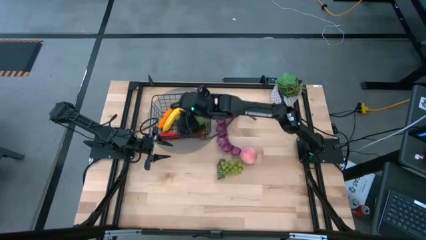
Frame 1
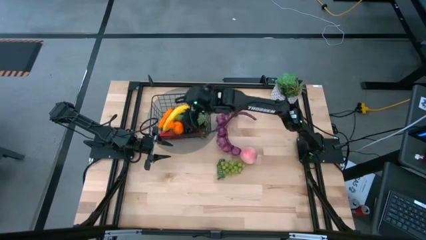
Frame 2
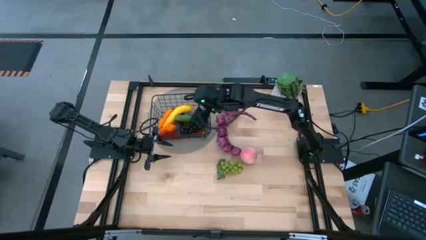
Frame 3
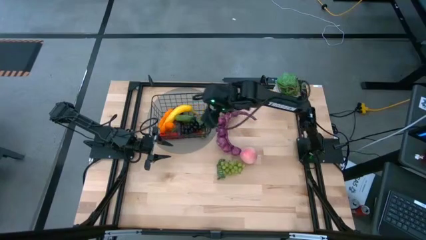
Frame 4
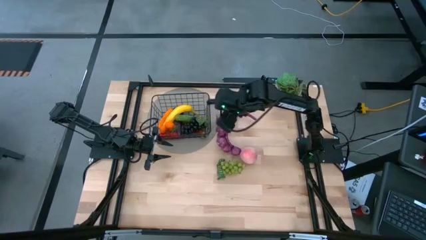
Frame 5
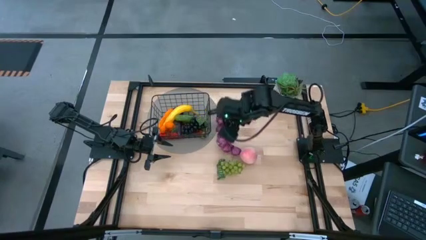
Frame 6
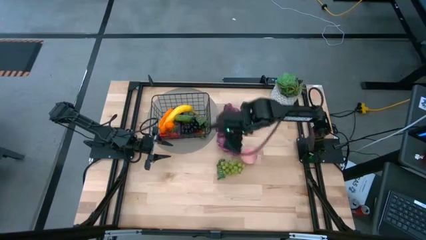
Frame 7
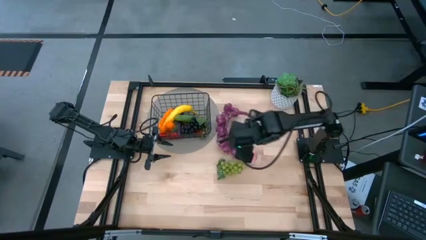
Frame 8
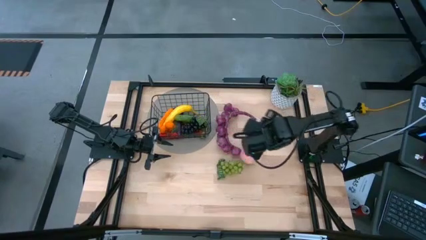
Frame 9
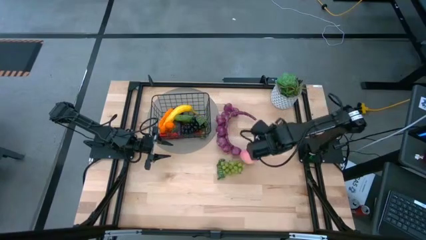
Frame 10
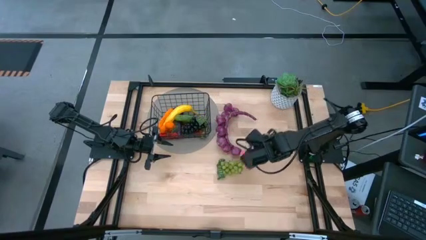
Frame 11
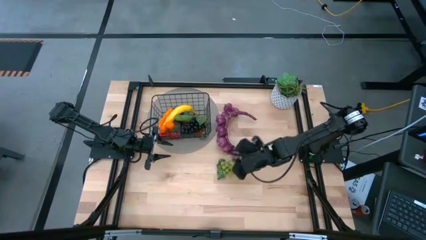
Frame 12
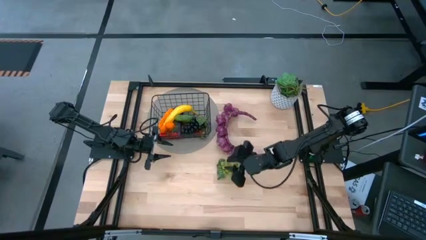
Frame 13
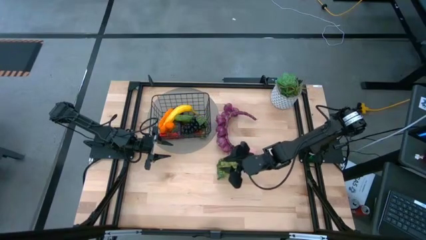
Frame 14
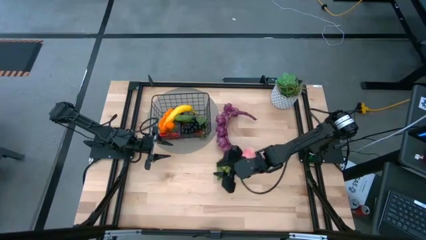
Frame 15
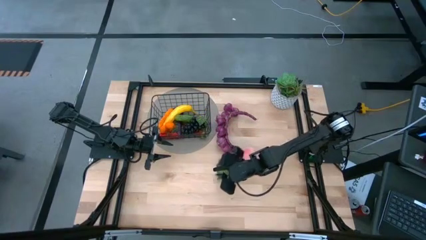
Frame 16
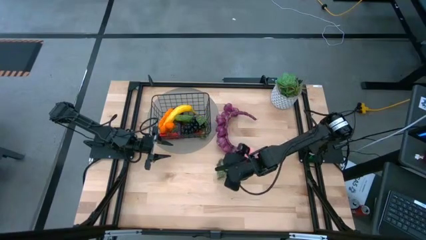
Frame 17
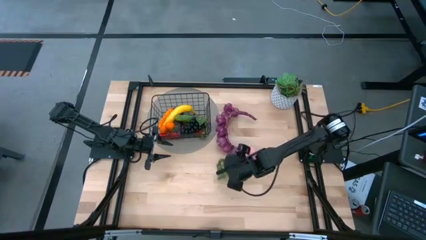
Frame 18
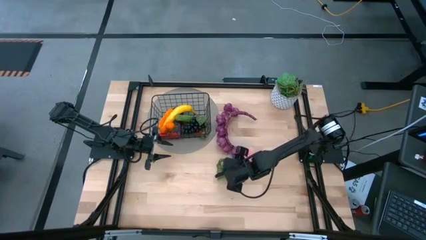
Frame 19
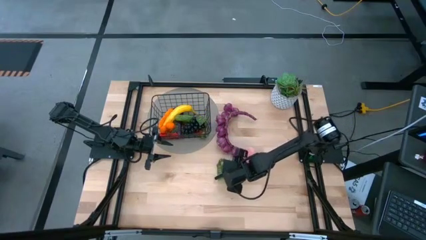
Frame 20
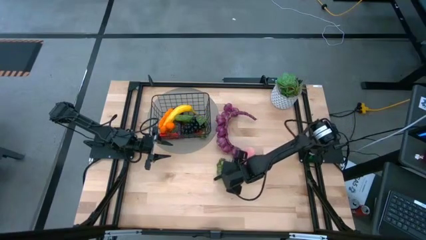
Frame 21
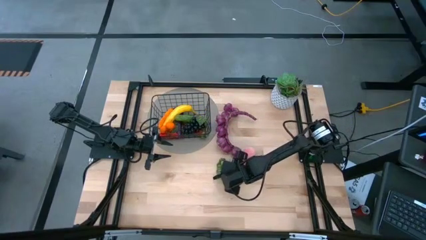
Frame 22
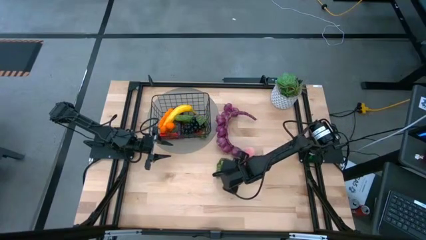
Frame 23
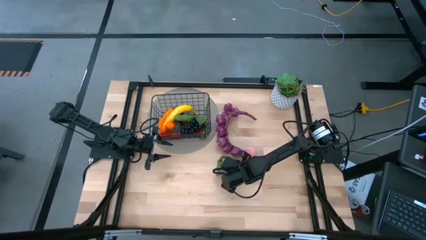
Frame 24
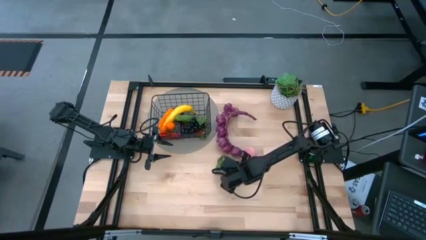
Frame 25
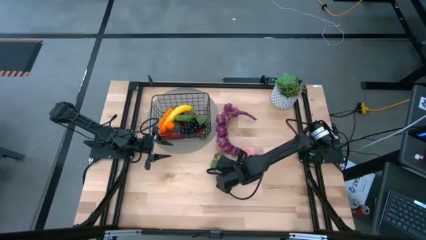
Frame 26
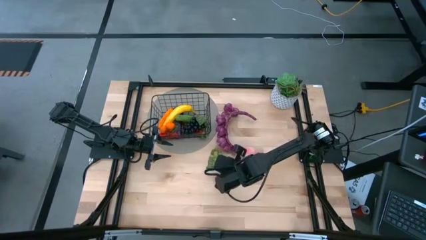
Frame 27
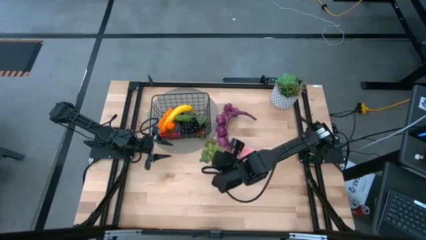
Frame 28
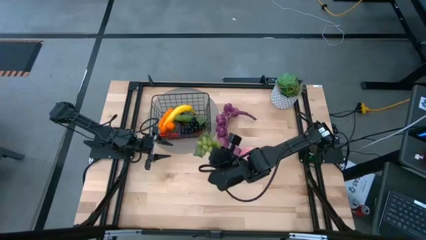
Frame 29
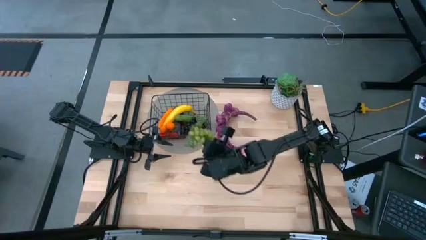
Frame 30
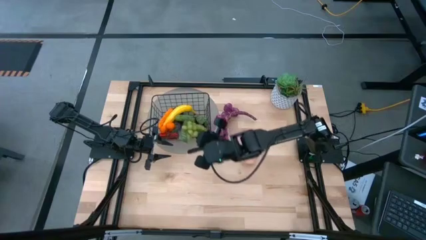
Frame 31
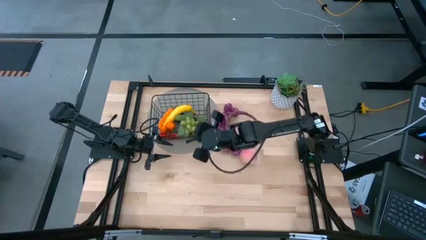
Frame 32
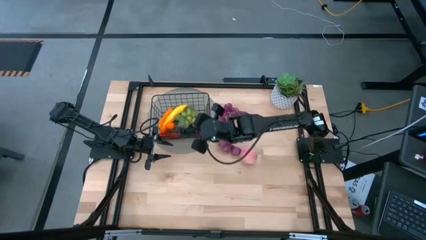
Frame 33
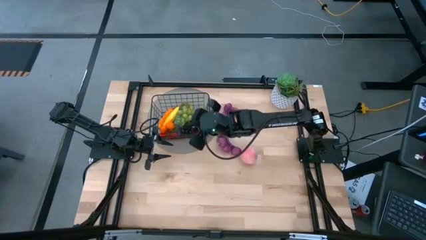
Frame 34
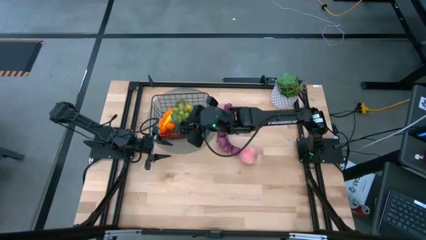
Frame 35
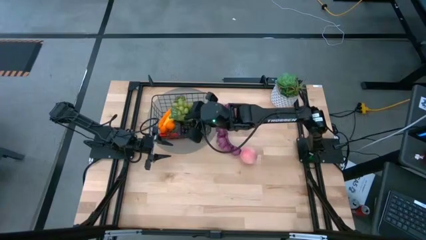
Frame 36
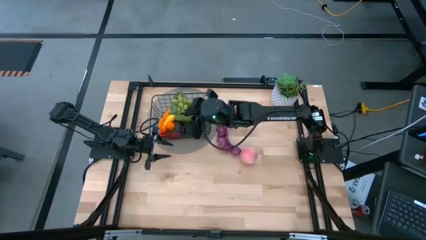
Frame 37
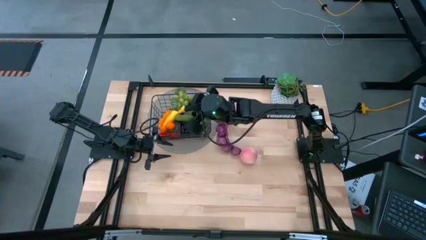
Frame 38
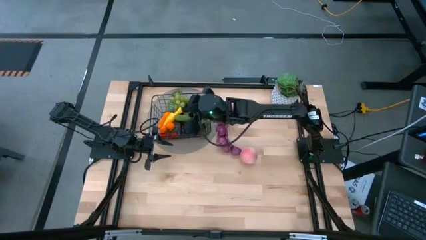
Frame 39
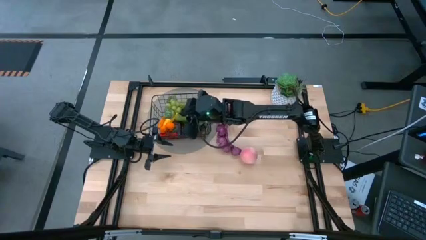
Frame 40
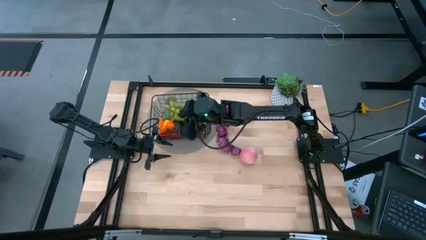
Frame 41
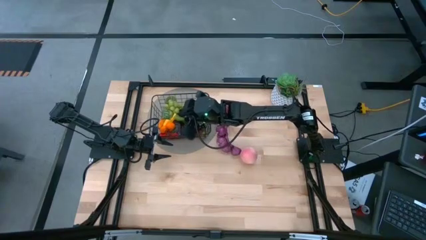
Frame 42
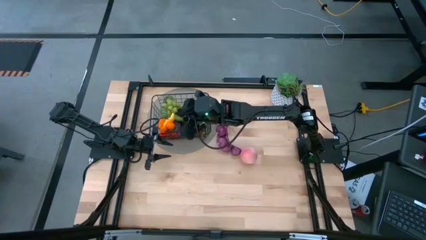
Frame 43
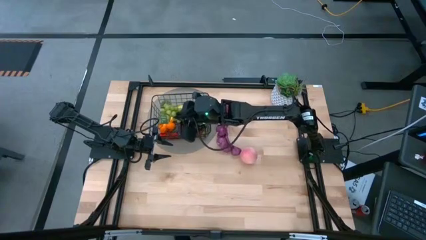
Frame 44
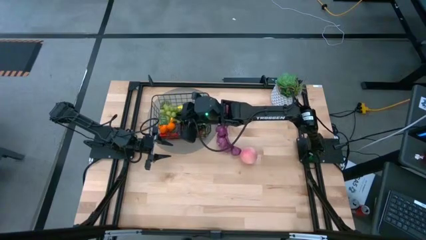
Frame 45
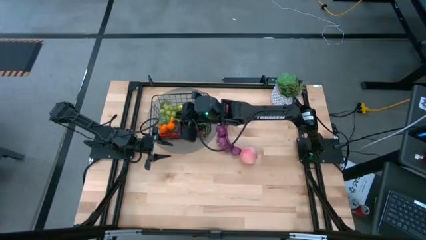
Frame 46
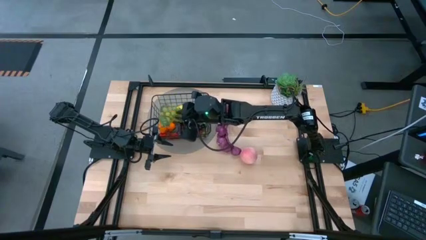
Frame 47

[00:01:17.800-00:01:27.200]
Task: Build produce basket
Put the green grapes into the wire basket

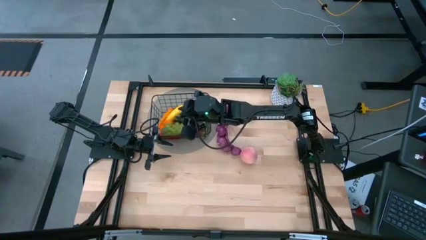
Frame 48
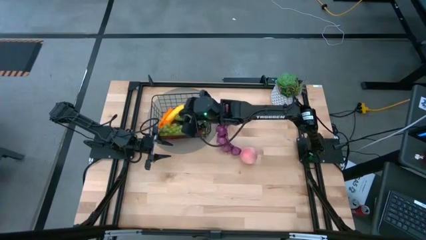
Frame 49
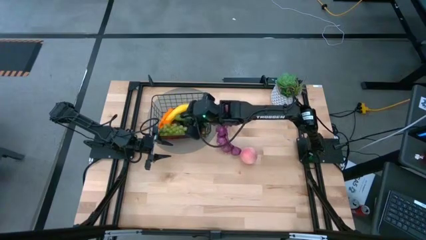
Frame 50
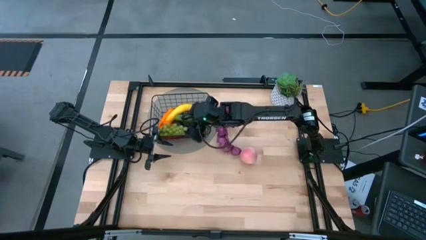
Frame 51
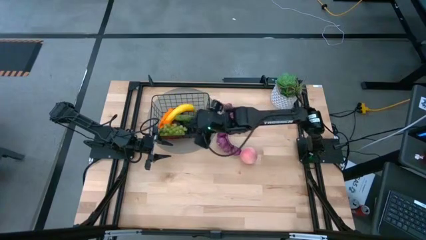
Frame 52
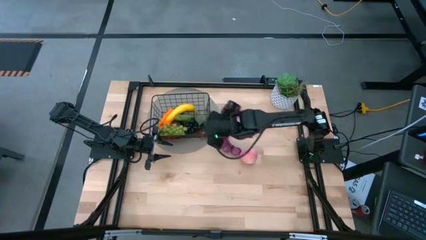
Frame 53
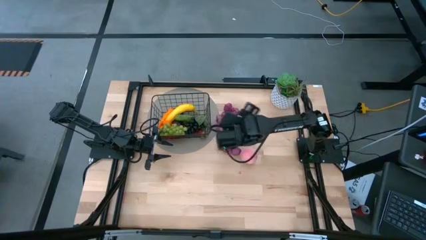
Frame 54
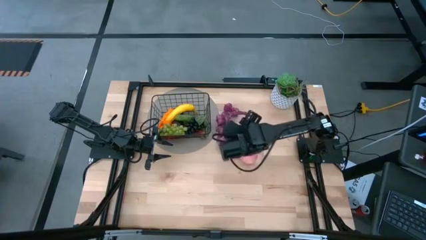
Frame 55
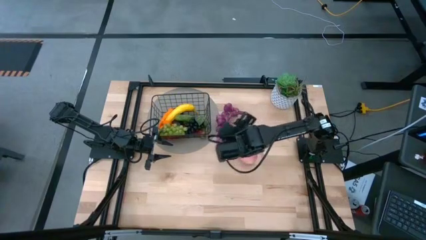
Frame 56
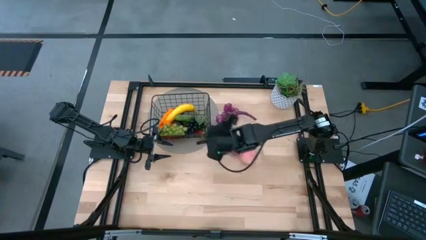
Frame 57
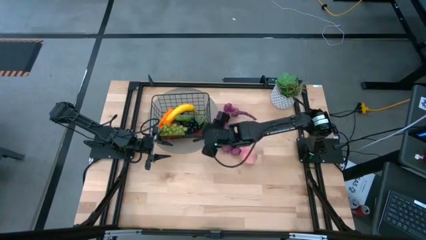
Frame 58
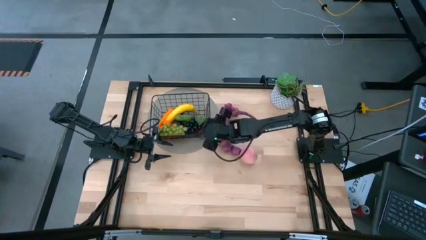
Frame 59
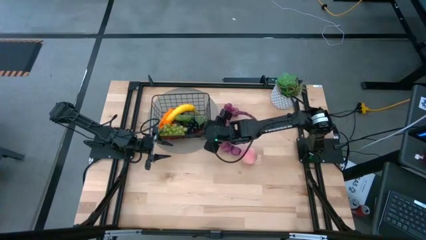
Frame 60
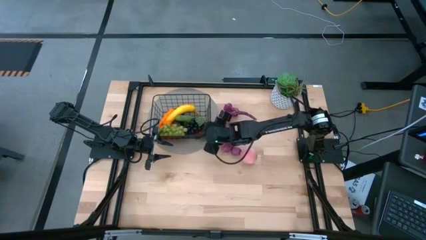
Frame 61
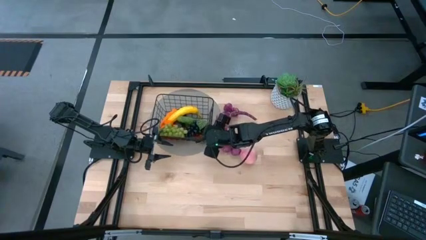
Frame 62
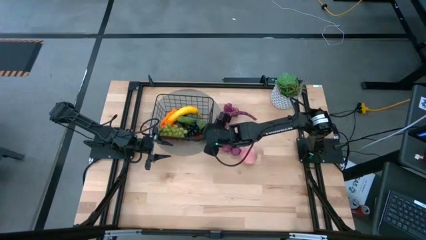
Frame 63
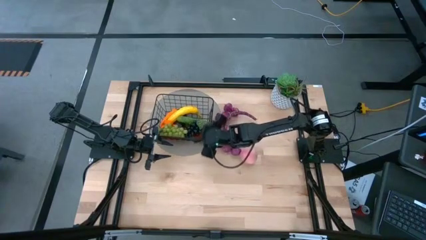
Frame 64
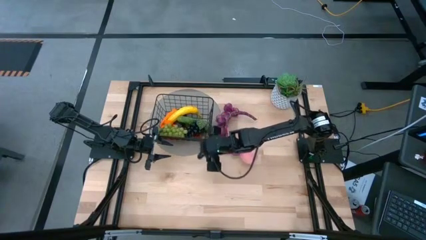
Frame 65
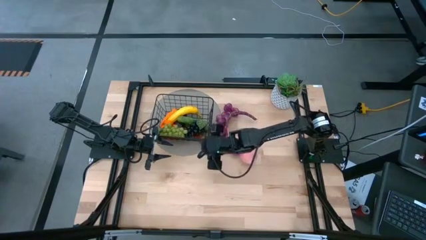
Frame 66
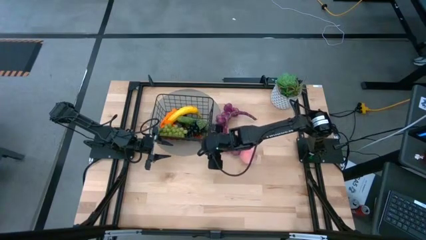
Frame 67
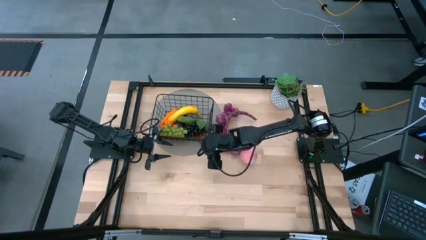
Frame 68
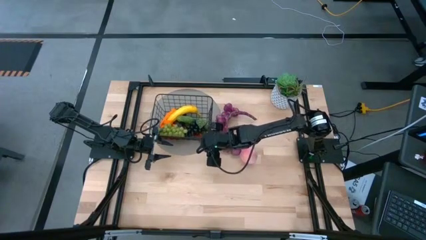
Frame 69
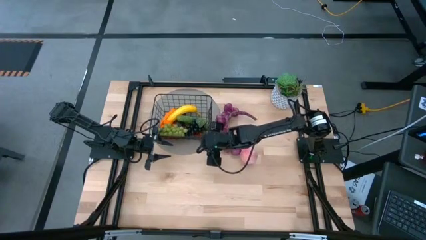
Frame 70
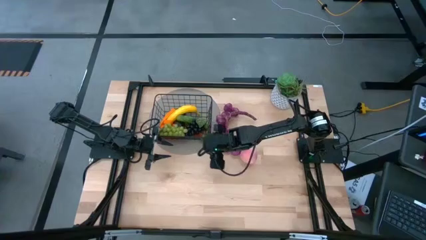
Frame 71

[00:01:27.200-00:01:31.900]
Adjust the wire basket

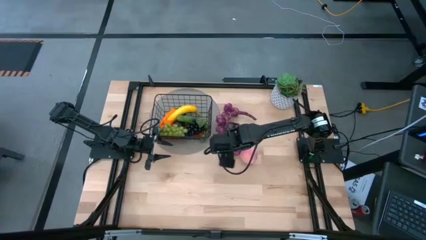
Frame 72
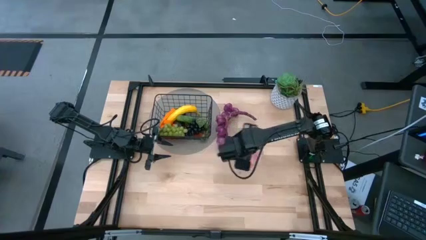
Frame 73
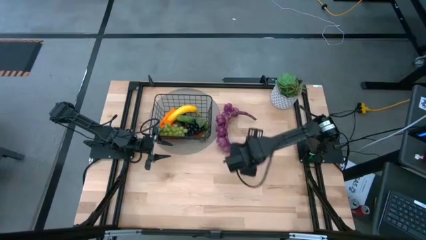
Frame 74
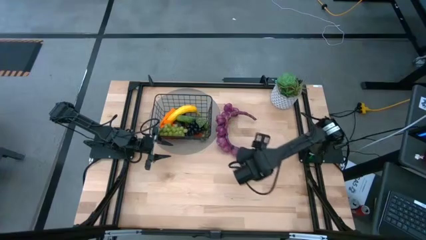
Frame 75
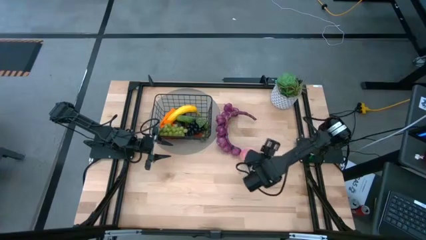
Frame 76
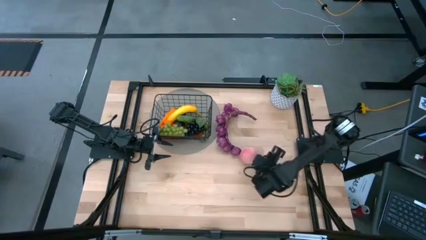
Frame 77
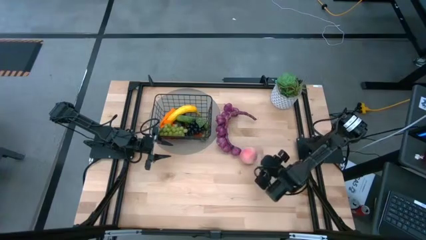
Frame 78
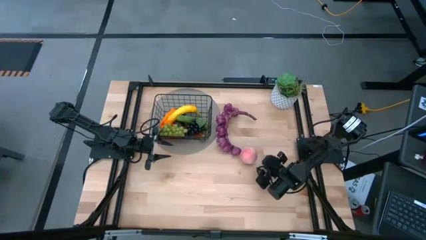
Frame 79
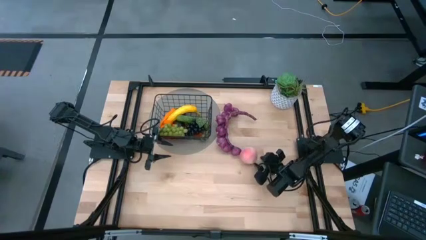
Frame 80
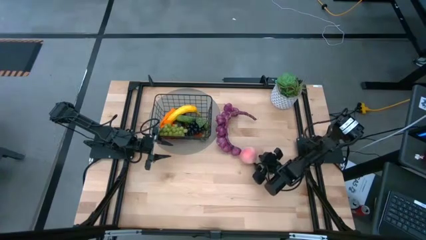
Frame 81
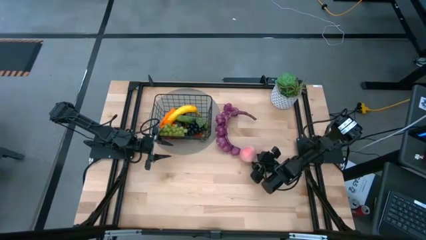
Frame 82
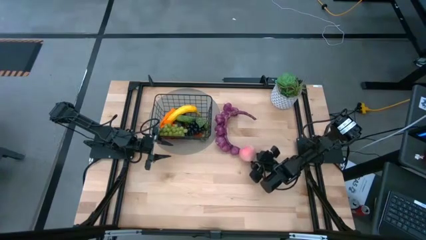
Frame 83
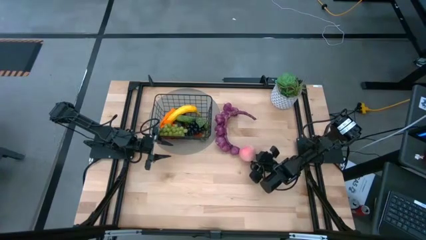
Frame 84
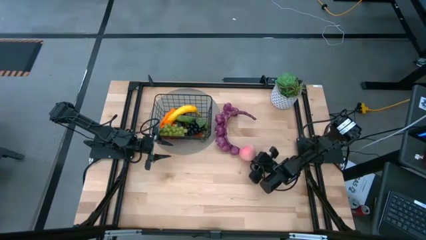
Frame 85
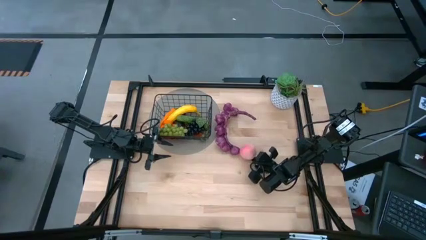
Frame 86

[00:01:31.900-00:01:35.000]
Put the peach into the wire basket
